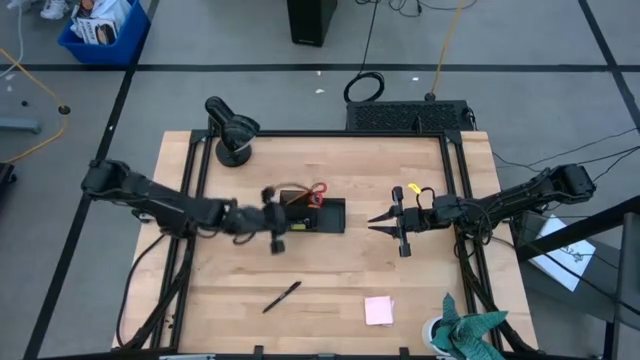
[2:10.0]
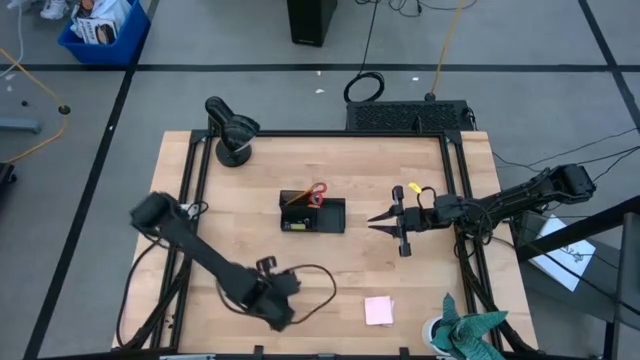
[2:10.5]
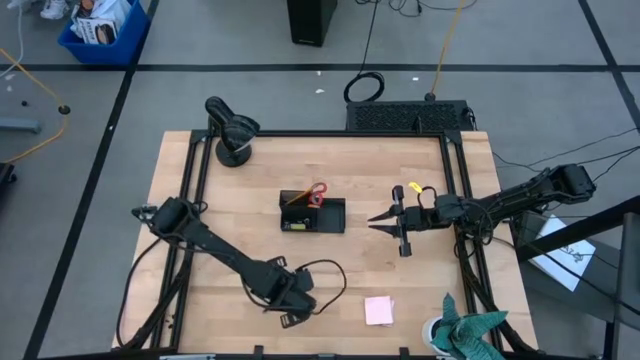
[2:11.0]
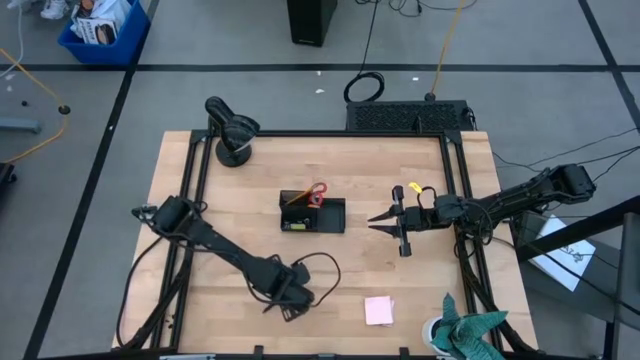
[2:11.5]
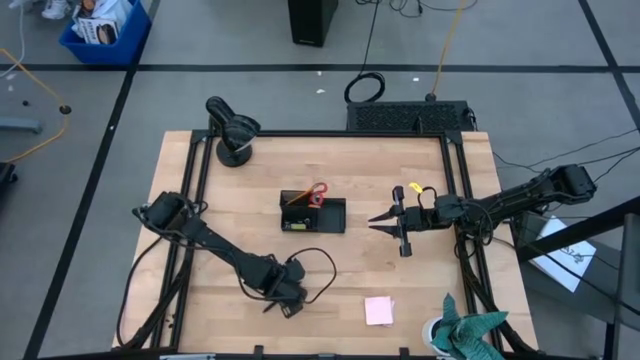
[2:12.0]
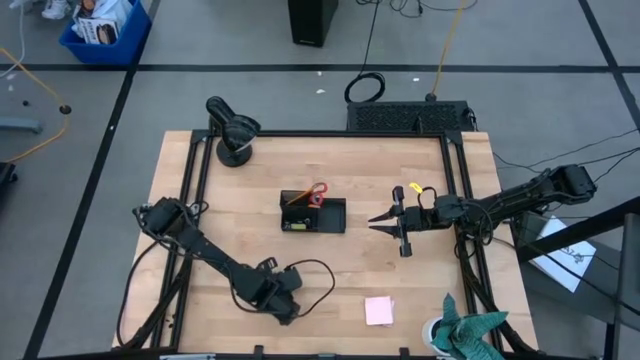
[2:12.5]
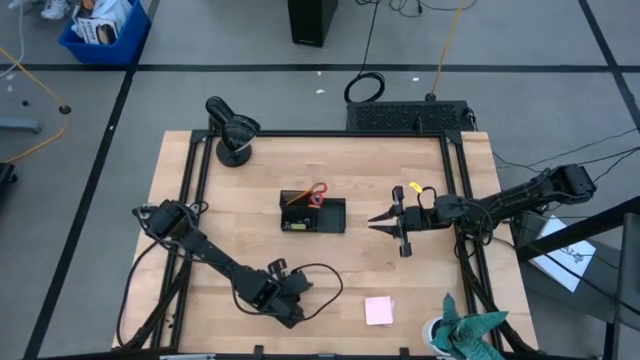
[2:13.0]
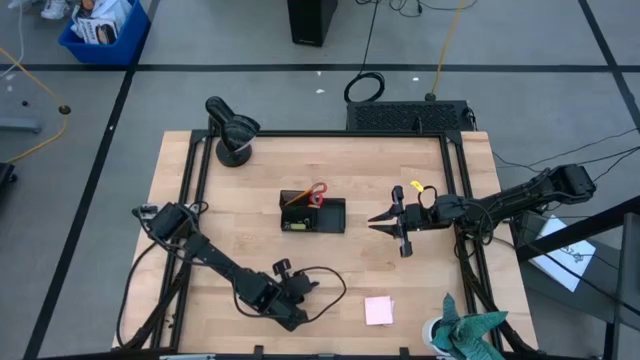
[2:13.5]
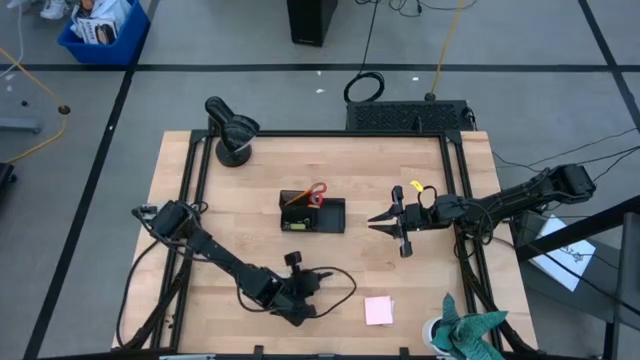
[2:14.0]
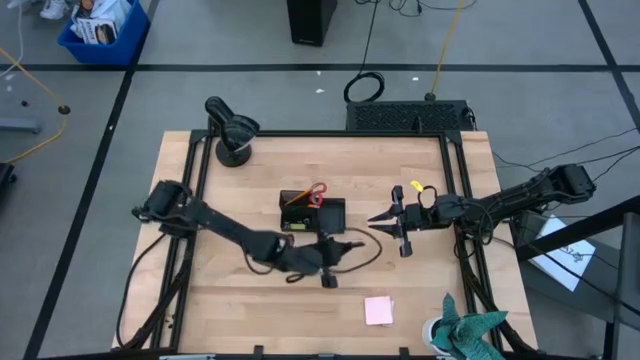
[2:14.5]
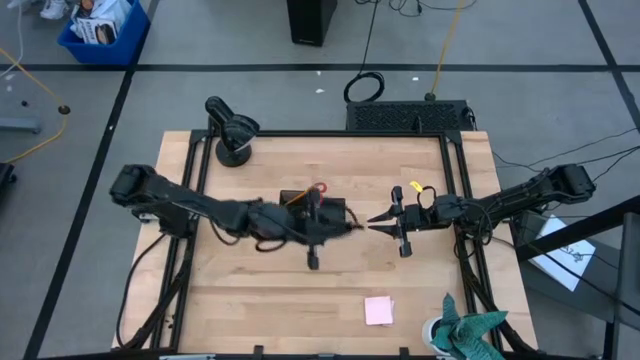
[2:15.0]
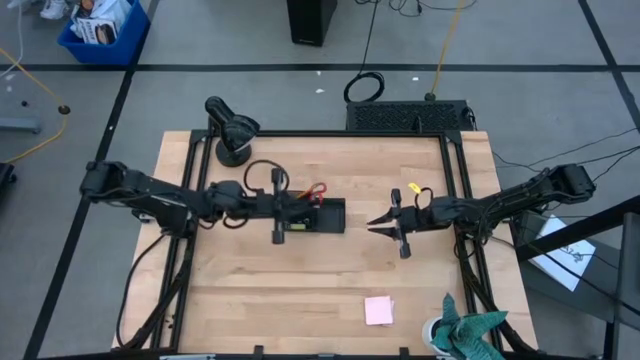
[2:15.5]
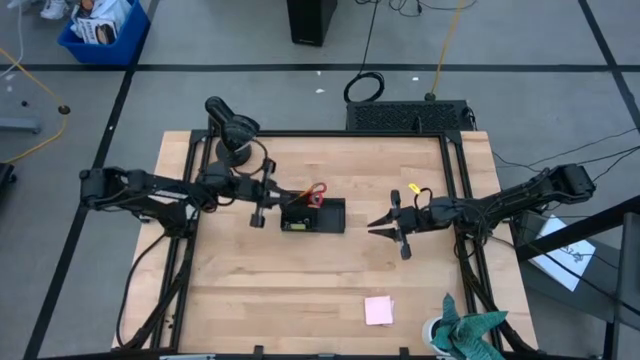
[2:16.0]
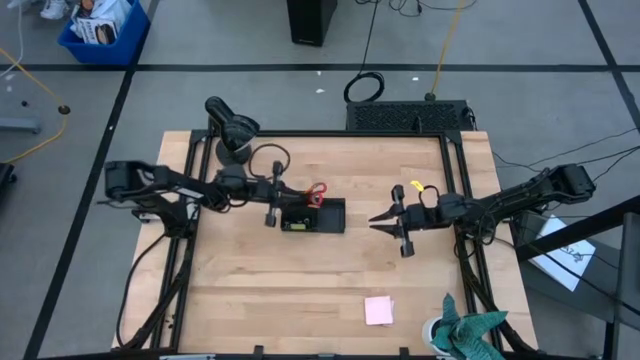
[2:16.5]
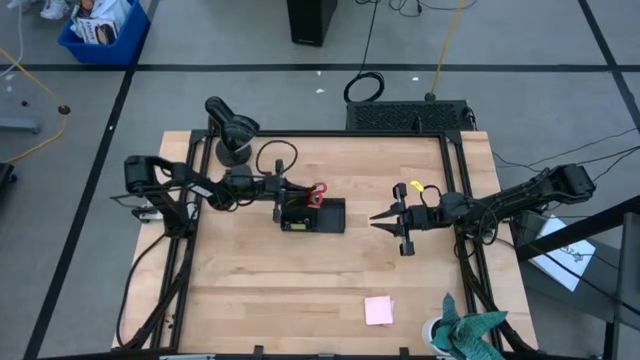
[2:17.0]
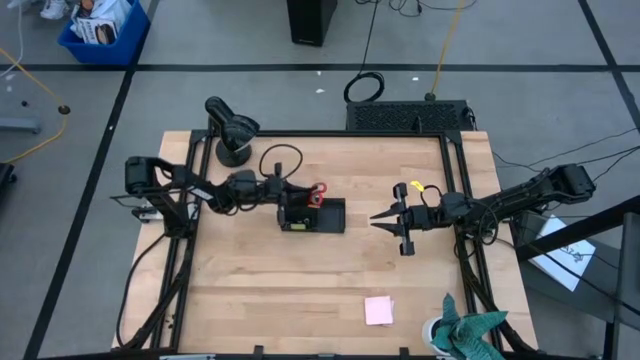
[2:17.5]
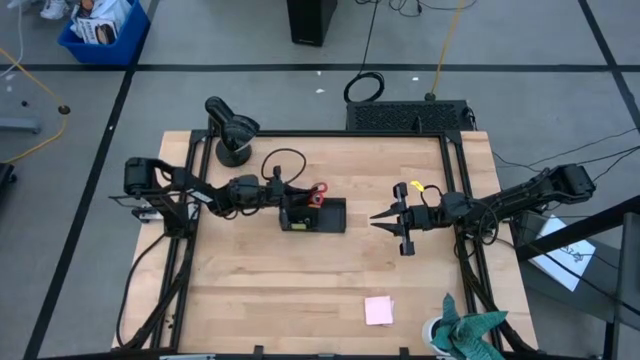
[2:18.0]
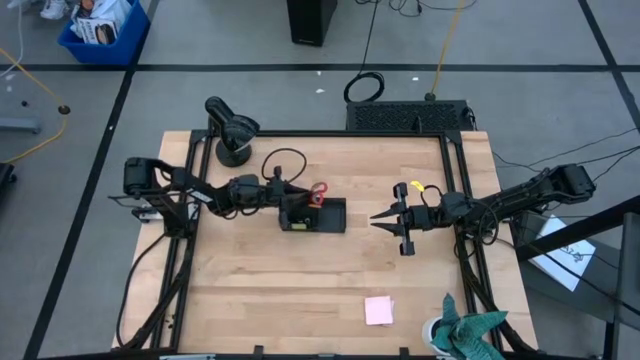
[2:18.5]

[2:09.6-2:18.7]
Task: Pick and place office supplies into organizer
Put the black pen into the black desk organizer

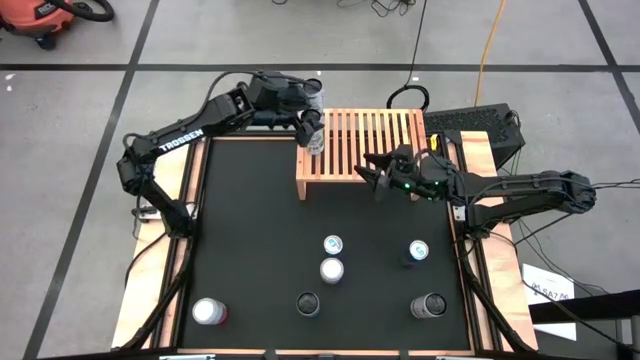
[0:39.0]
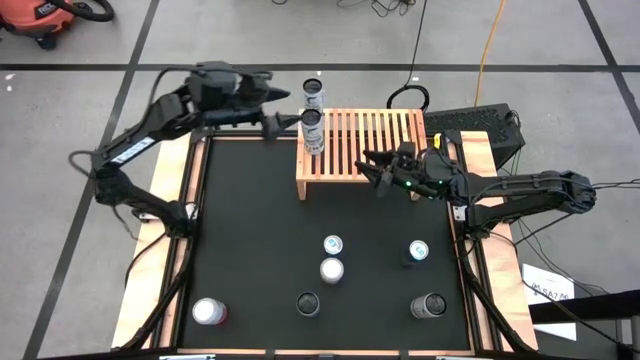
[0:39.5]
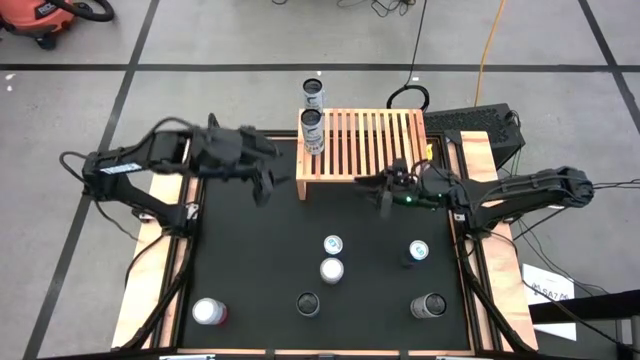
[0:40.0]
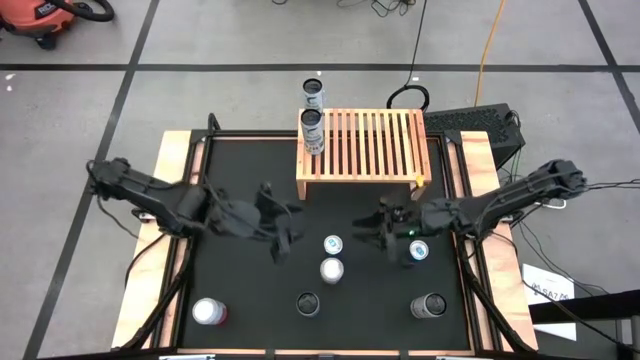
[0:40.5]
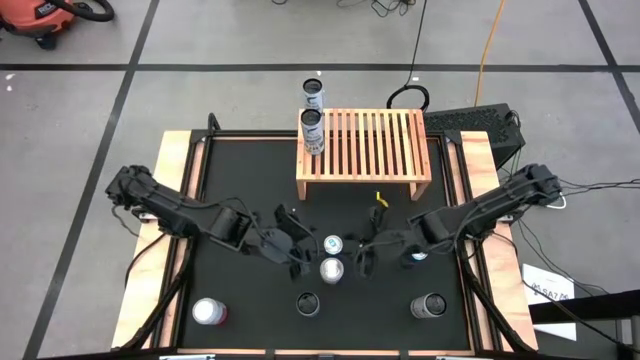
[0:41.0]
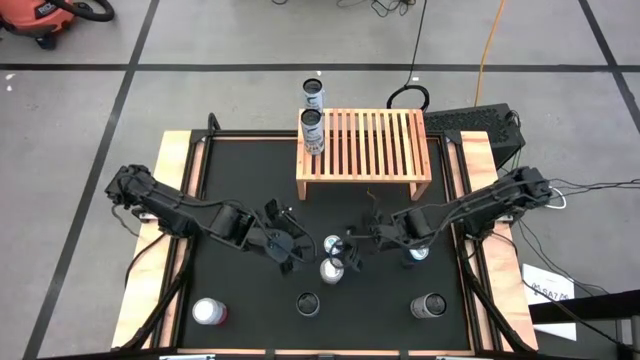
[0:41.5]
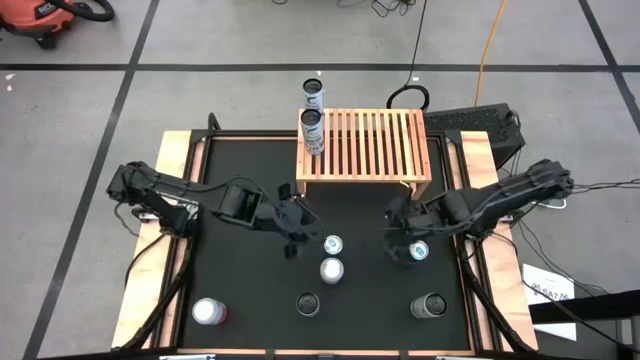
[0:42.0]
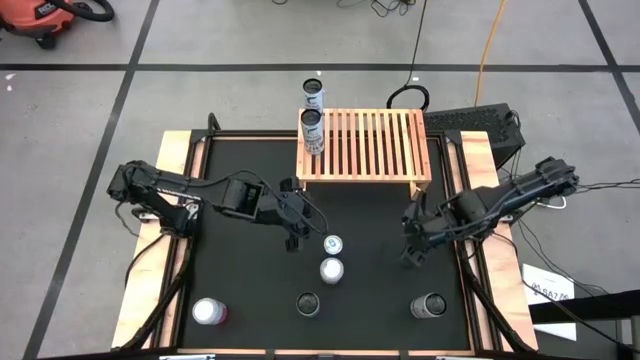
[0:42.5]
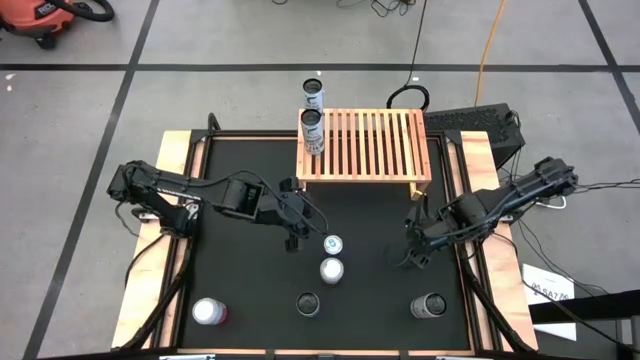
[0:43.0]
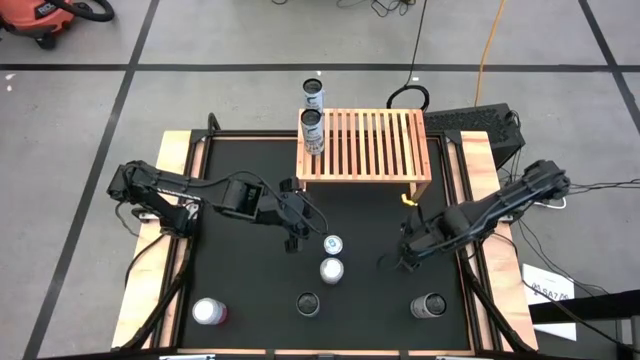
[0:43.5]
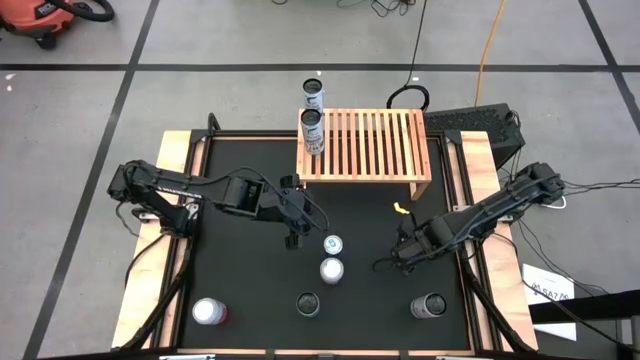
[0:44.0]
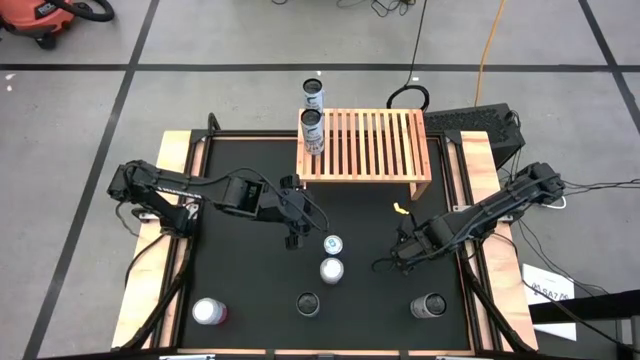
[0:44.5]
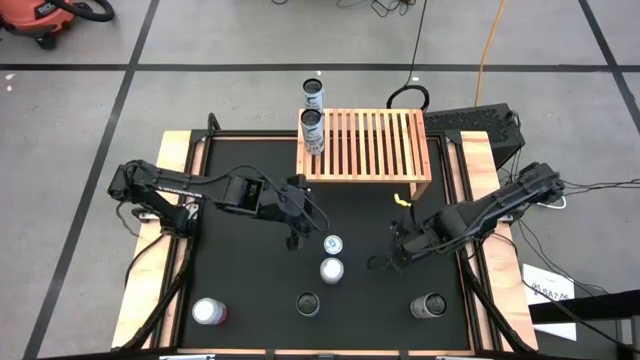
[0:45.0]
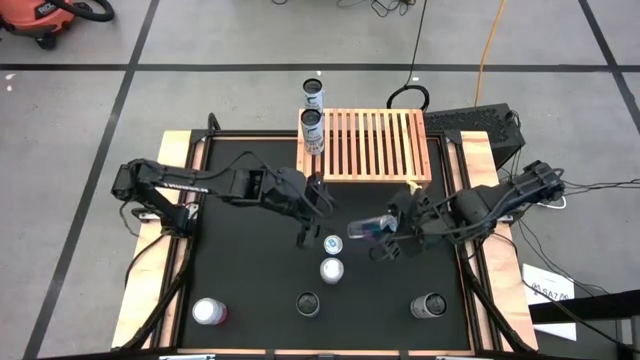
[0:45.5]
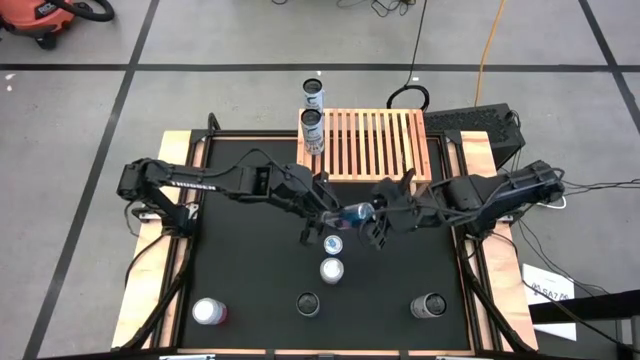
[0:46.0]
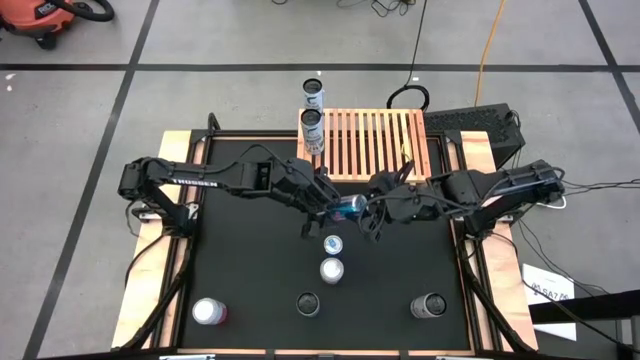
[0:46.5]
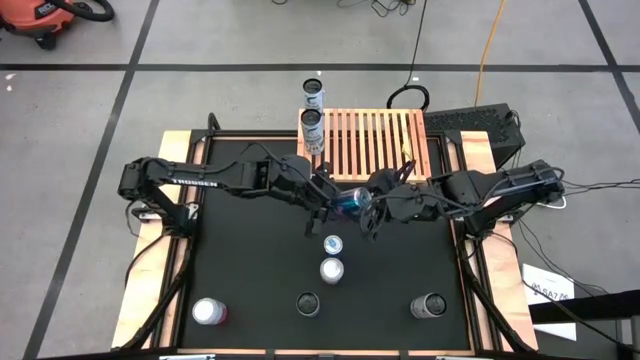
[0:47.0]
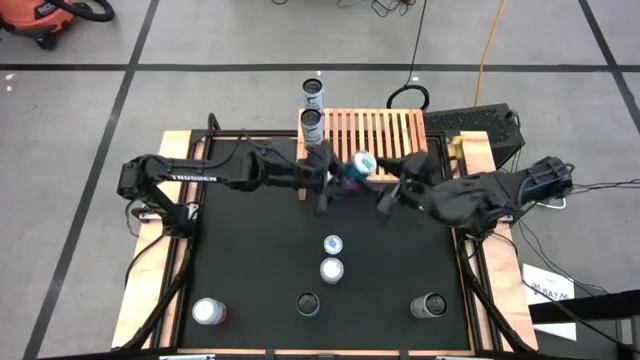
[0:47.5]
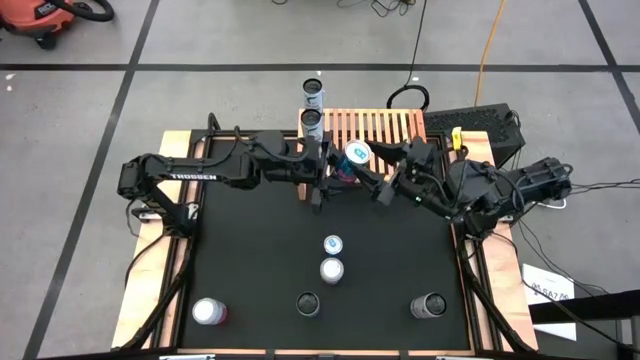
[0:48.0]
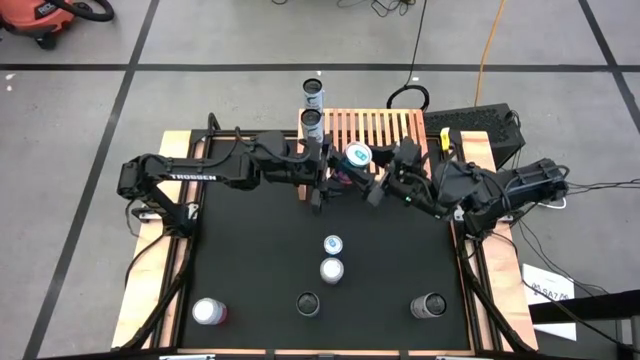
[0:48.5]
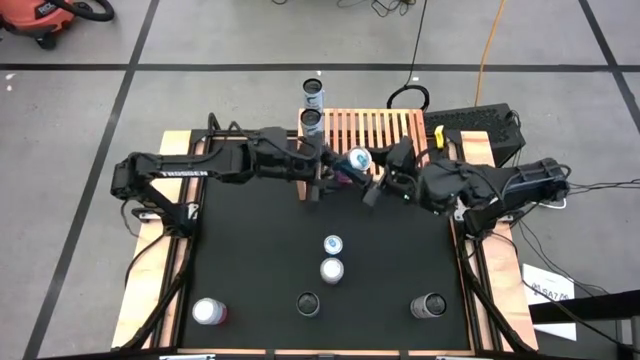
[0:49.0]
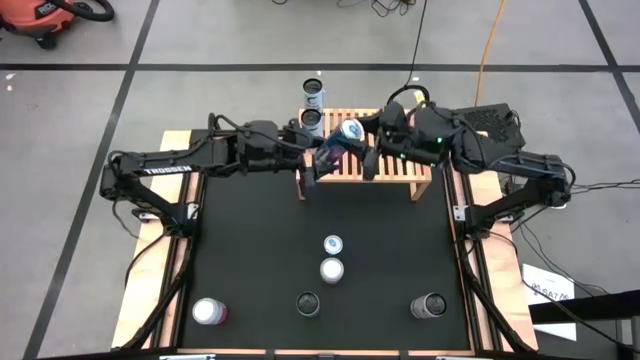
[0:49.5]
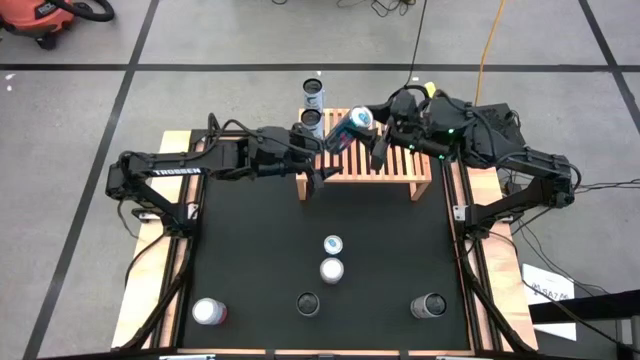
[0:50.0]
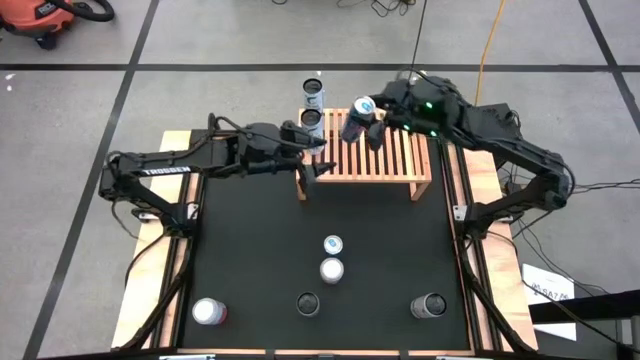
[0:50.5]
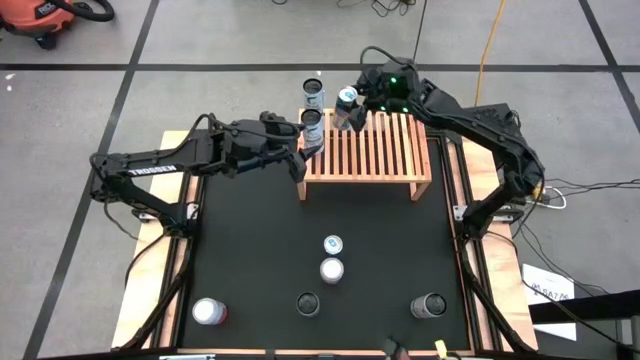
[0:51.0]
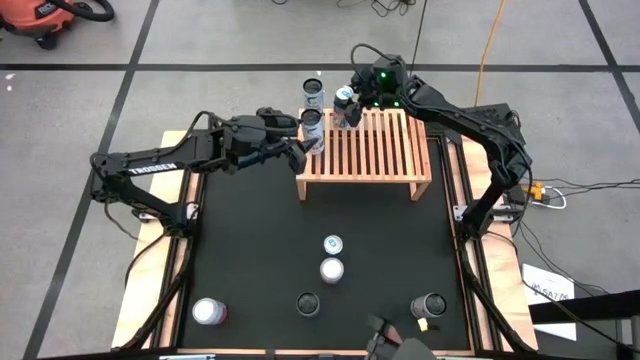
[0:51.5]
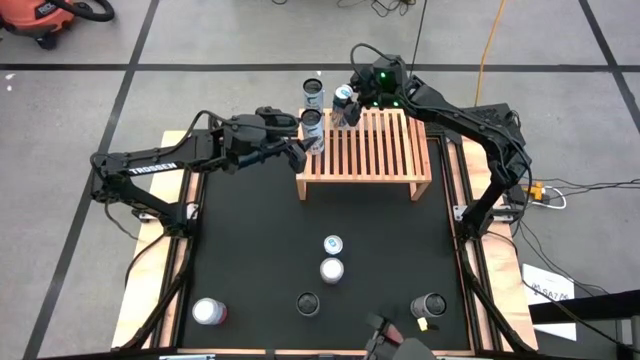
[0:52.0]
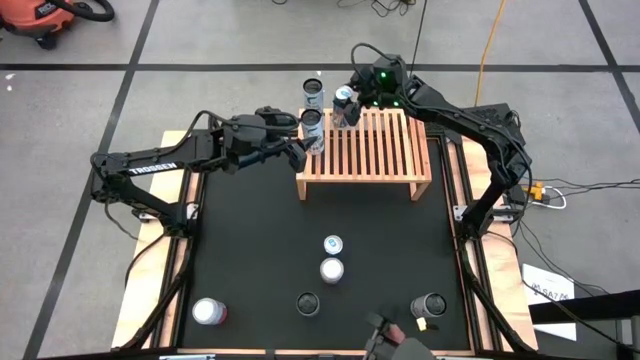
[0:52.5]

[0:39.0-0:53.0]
Task: Place canned beverage on shelf
Put the silver soda can on the shelf
